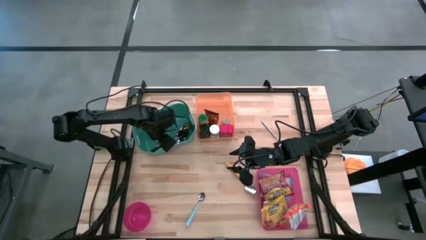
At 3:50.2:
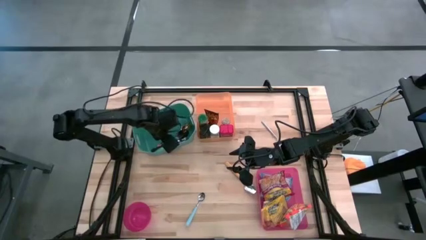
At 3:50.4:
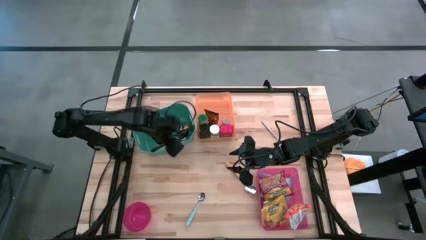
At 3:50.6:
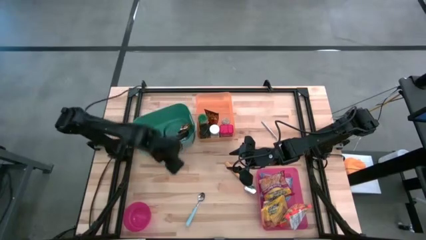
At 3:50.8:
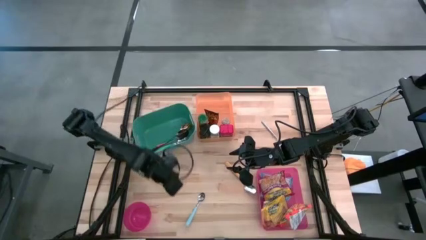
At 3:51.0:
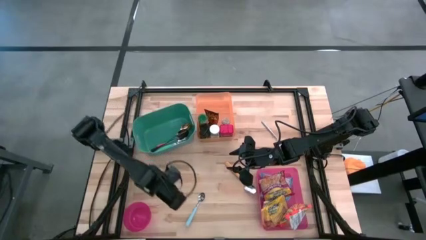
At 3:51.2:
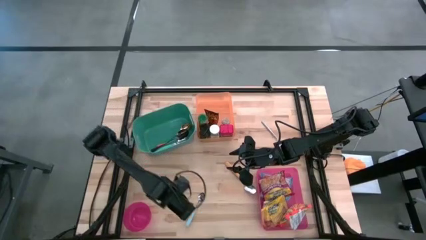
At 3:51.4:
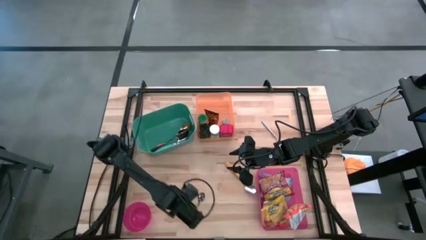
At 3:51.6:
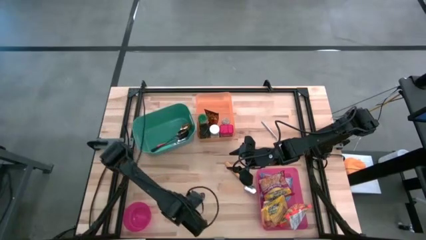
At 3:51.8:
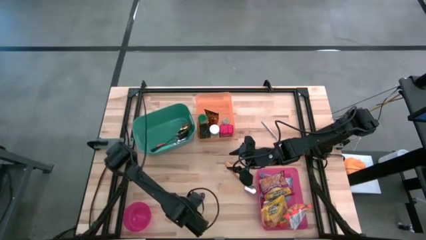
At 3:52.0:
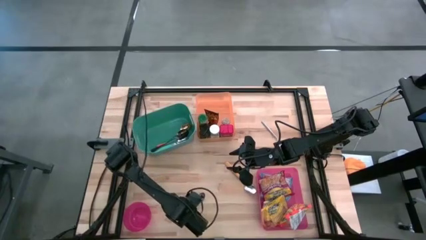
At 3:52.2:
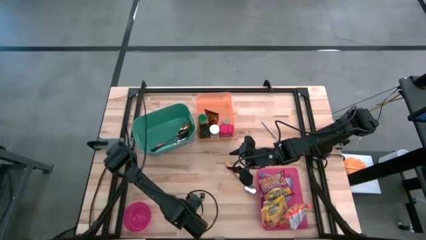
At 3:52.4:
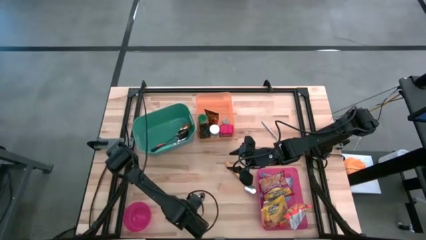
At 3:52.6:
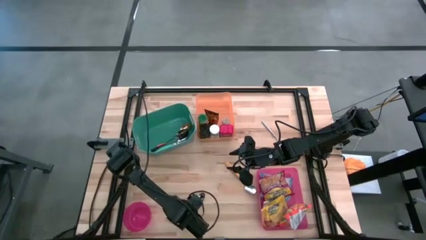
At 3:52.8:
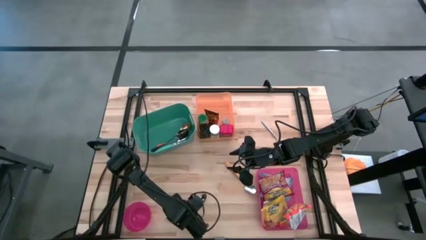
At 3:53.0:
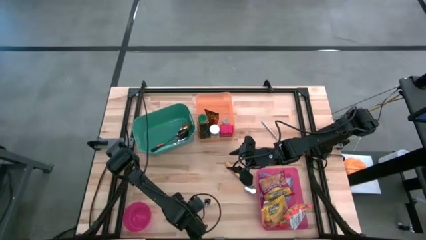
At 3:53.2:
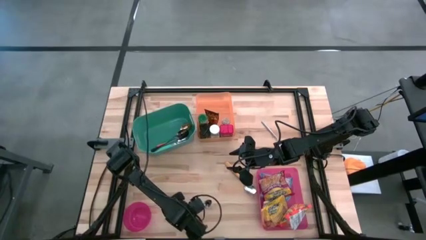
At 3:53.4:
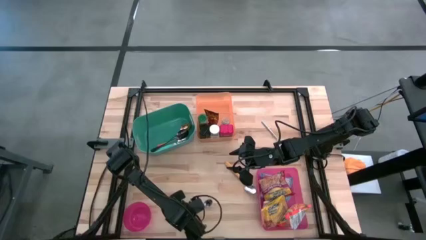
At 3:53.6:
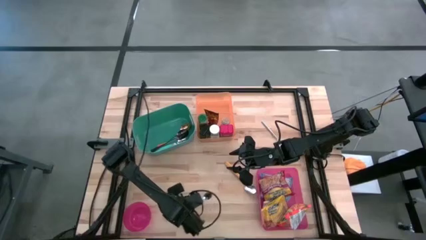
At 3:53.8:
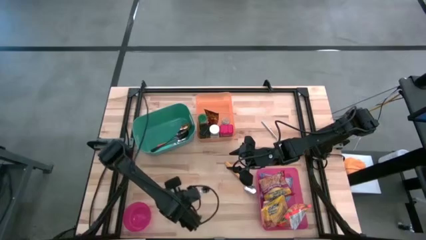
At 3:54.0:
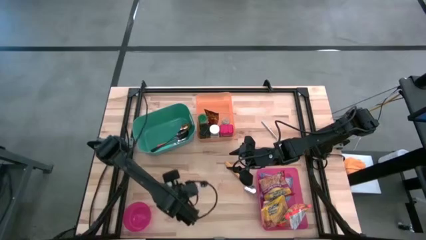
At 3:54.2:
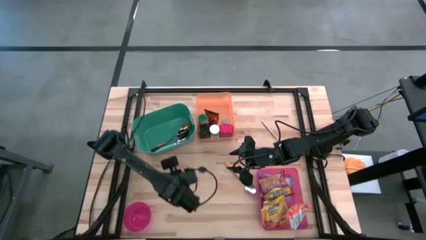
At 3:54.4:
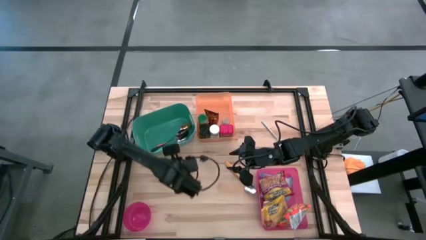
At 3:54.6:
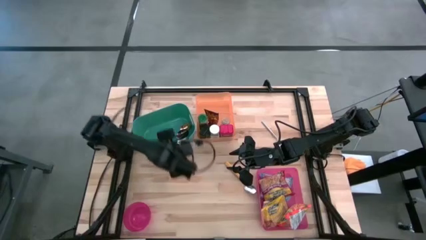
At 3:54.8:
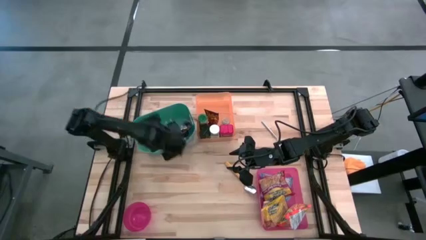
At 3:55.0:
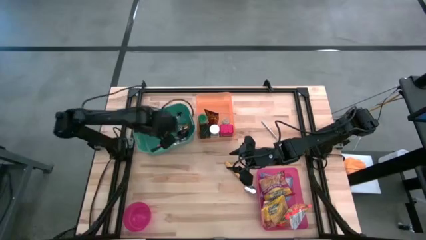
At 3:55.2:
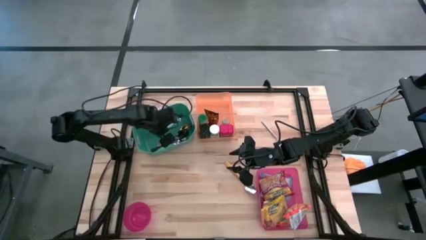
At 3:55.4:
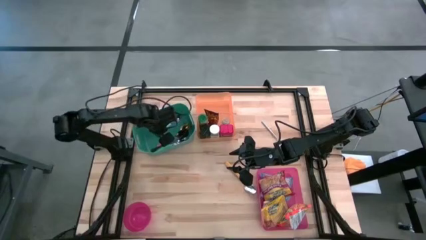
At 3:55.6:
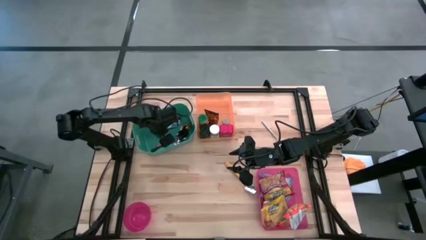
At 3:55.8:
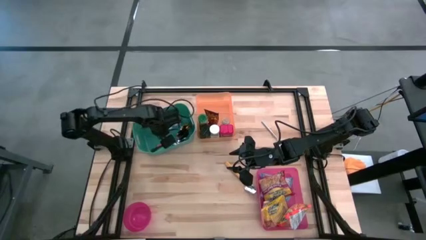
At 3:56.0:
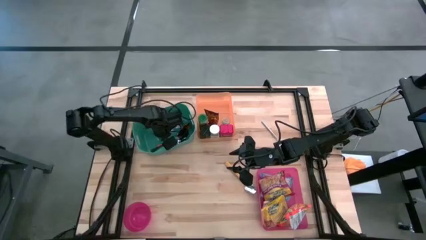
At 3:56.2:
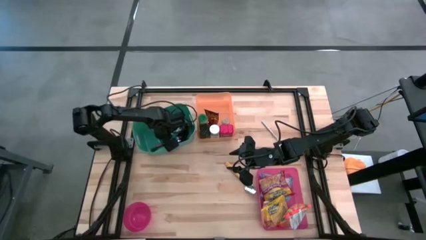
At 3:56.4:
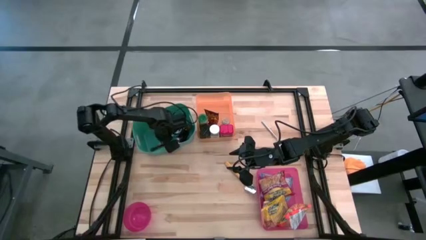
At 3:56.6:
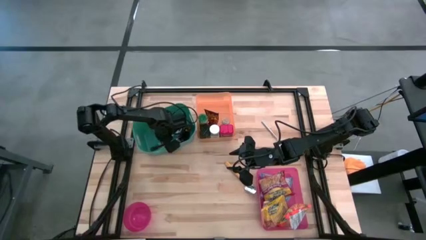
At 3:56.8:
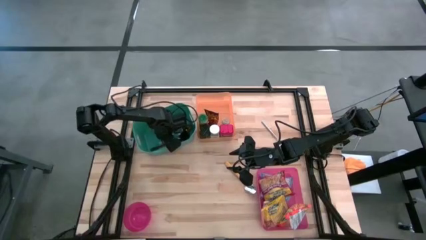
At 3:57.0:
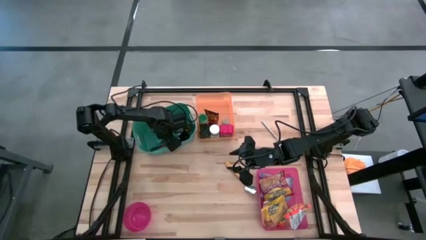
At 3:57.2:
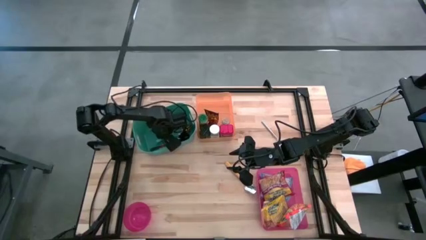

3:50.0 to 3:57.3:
Put the light blue spoon into the green bin
